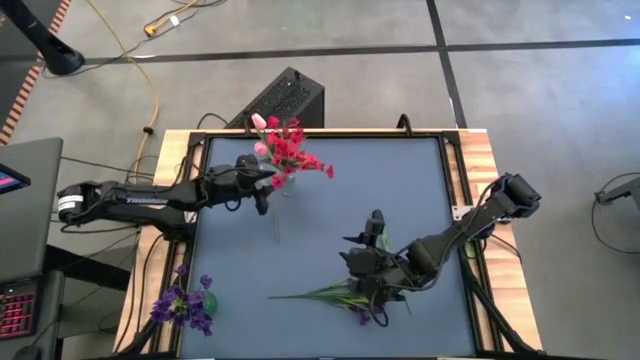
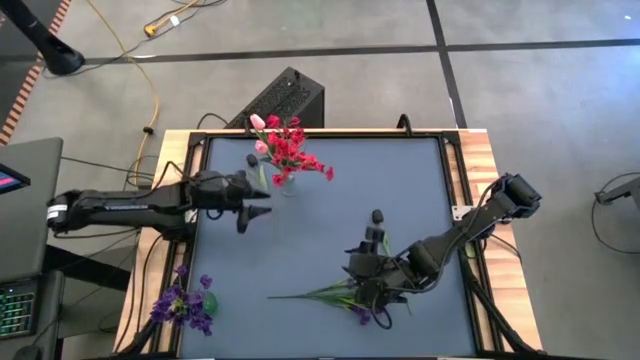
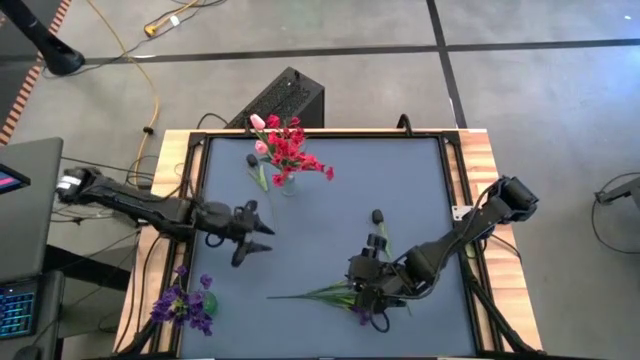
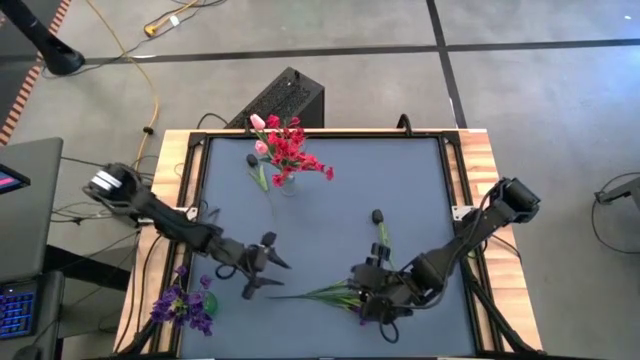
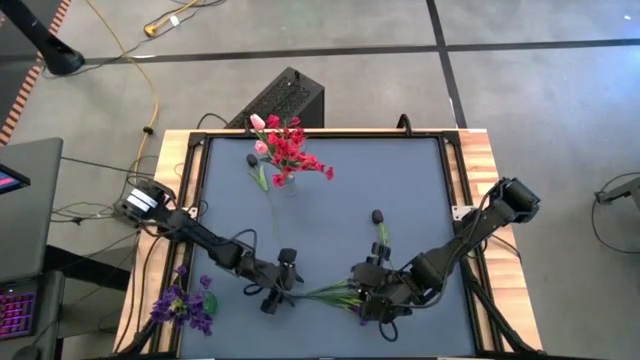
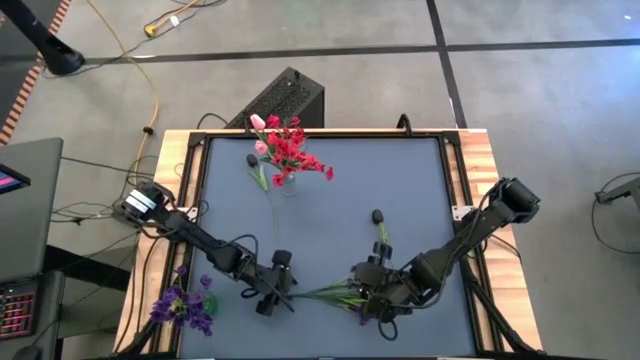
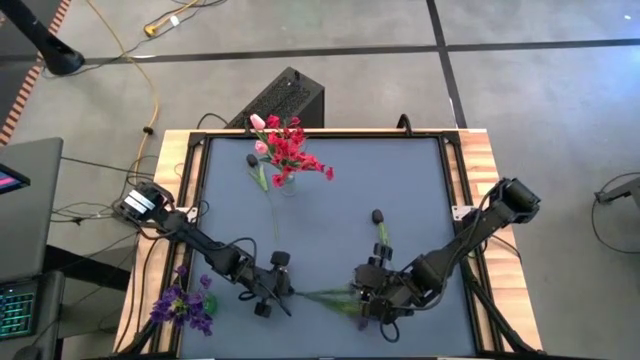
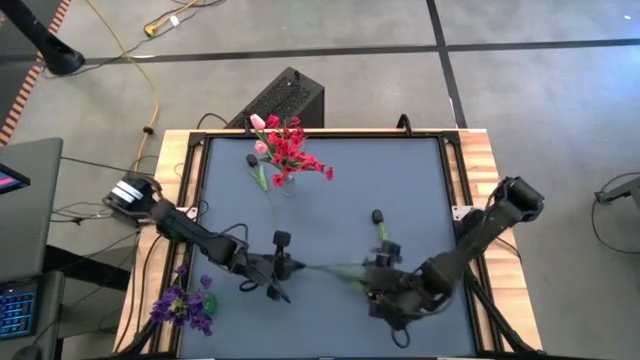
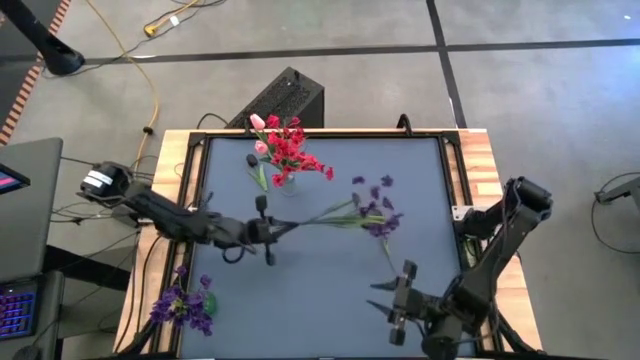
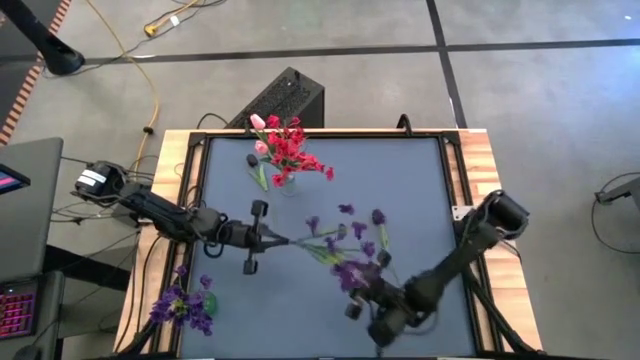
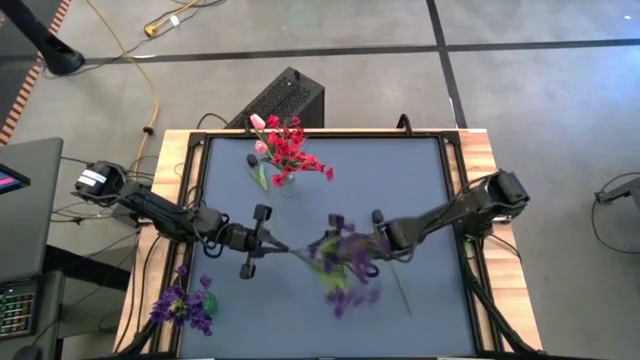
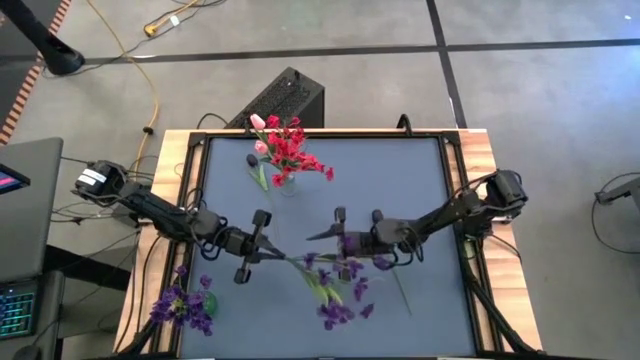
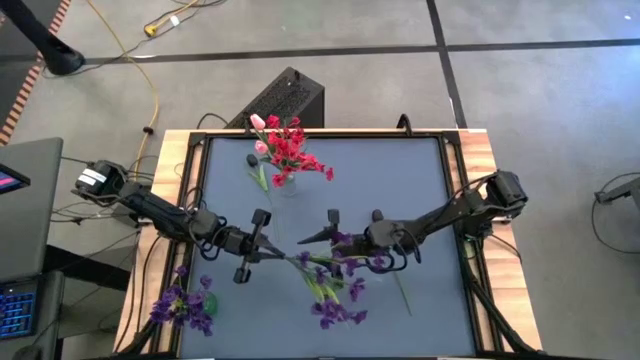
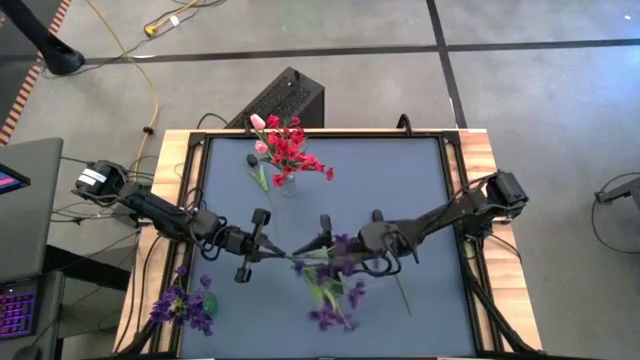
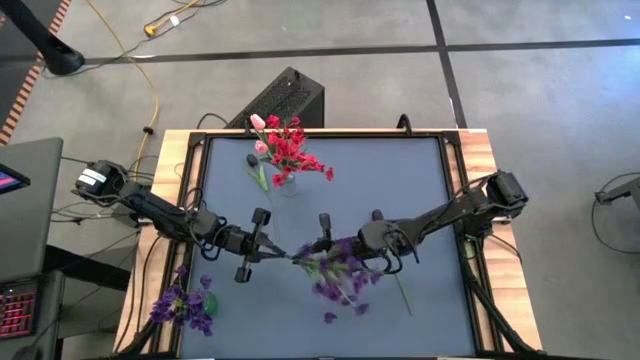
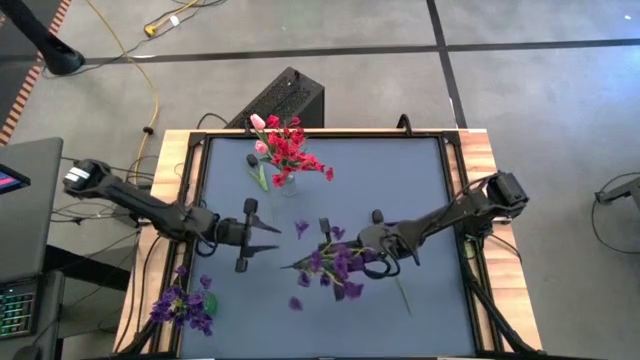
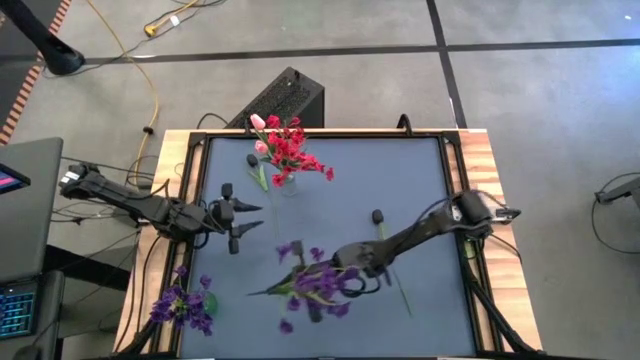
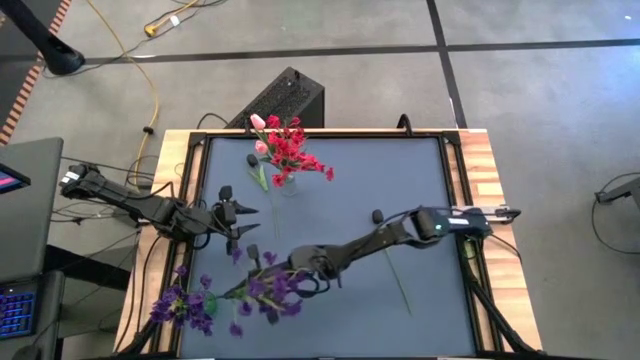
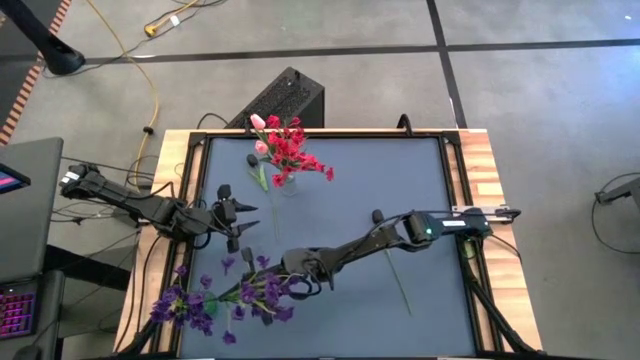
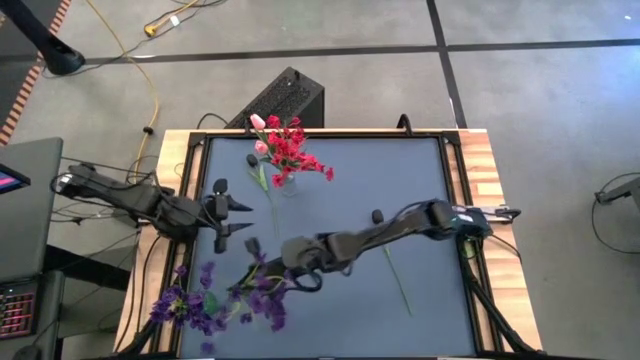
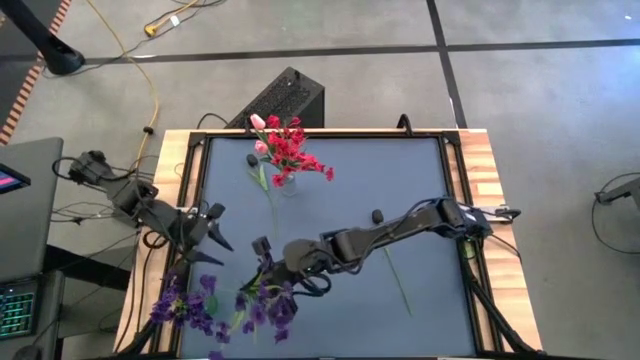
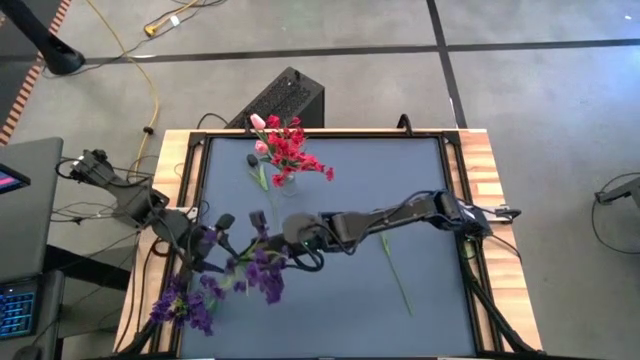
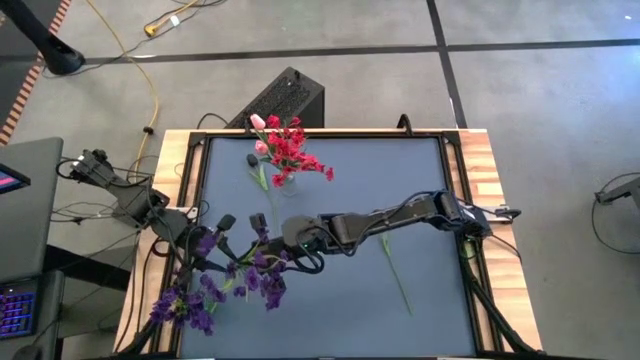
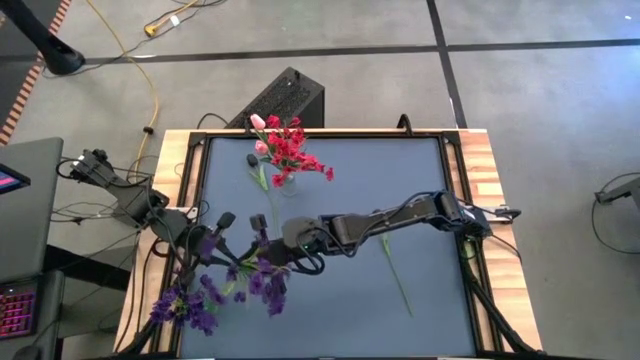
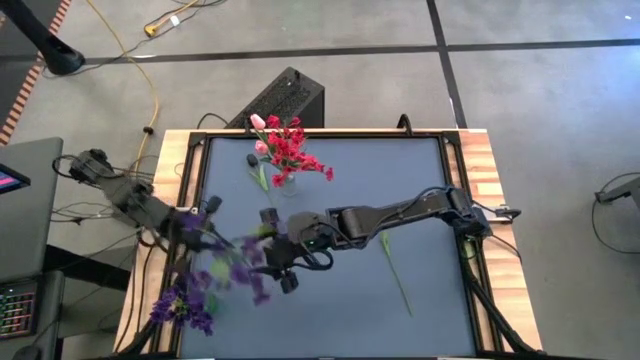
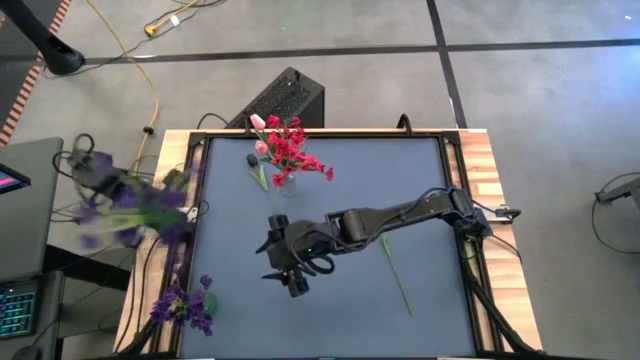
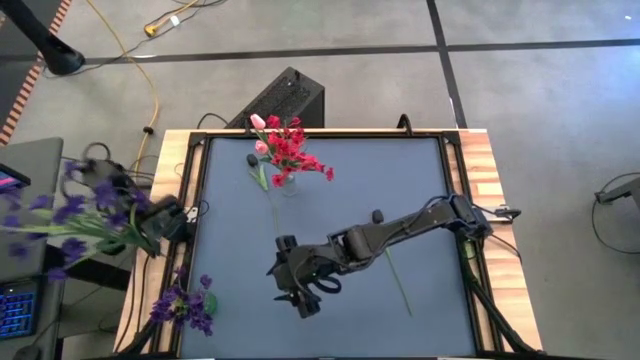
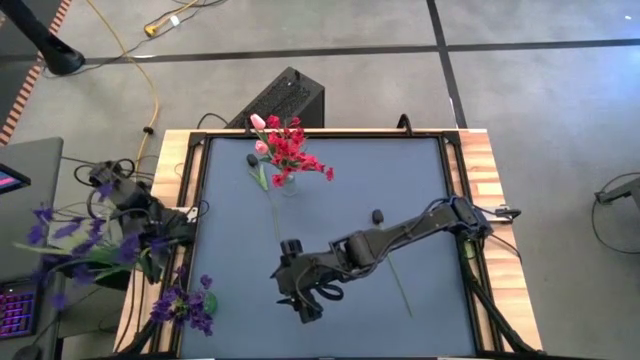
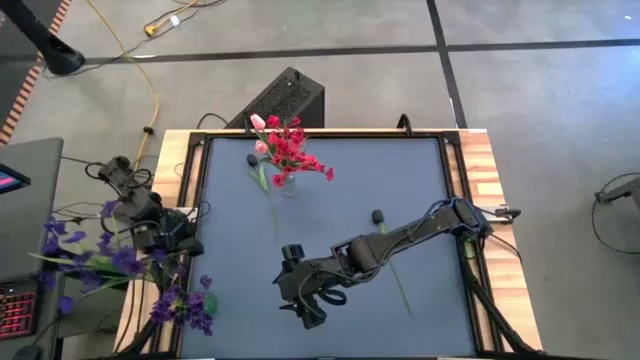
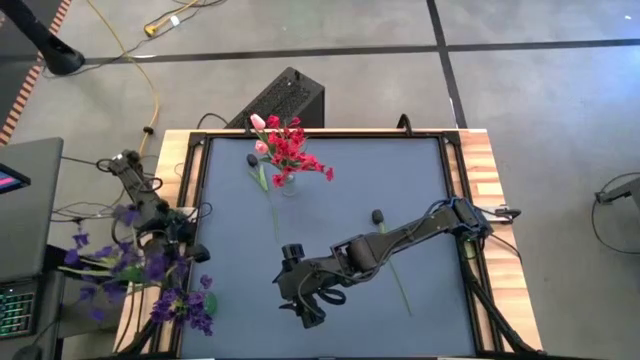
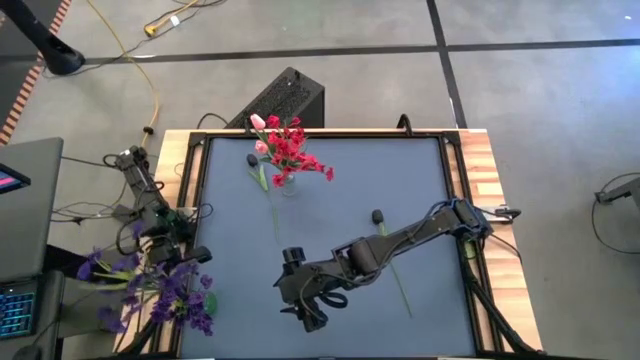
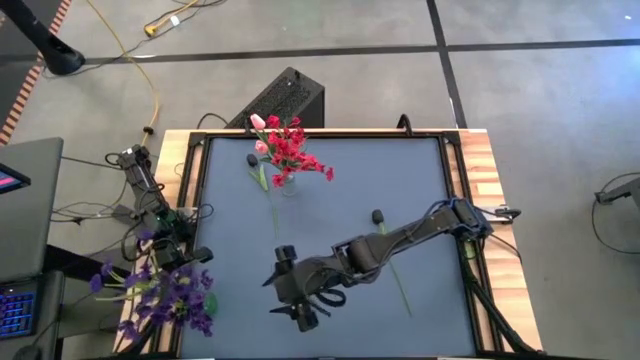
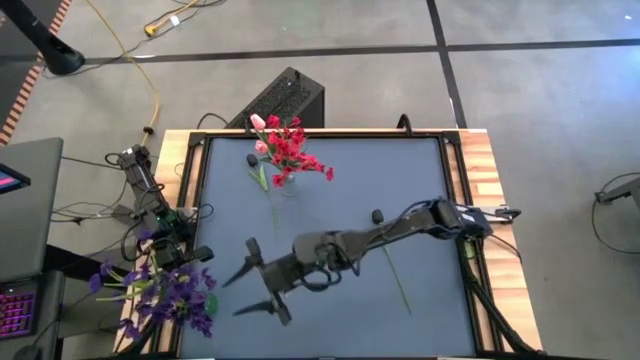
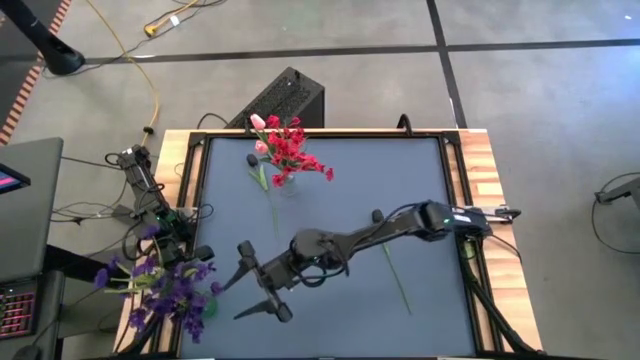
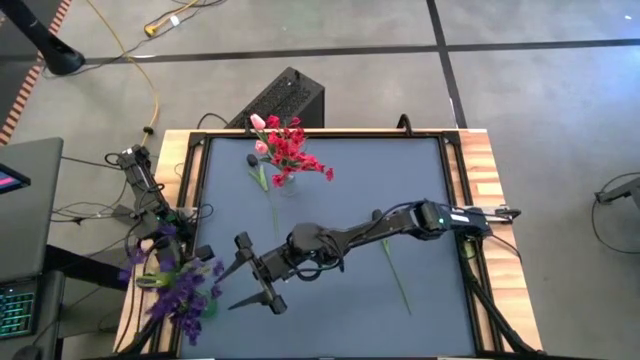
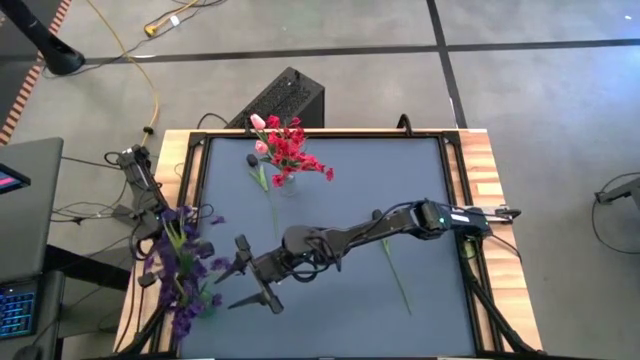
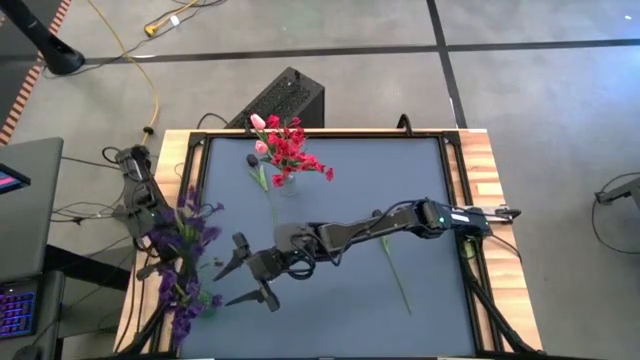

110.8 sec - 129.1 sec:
Task: Sort flowers into vase by color
Put the violet flowers into the green vase

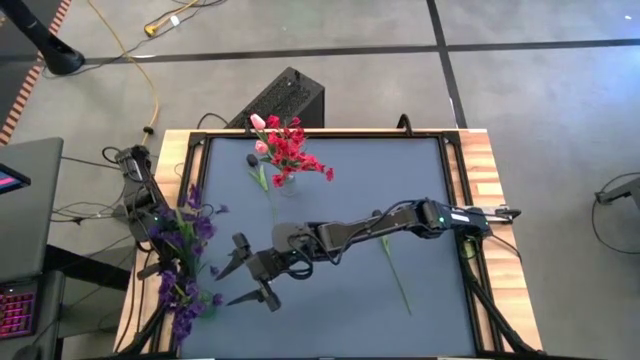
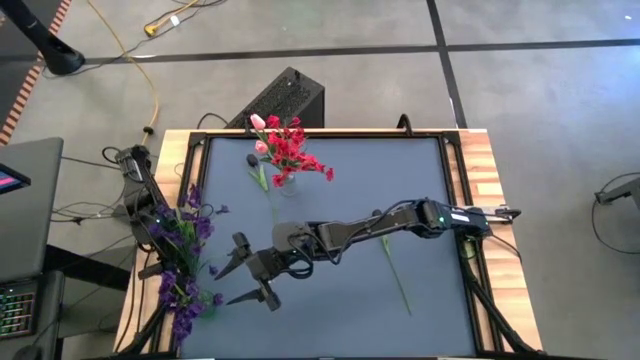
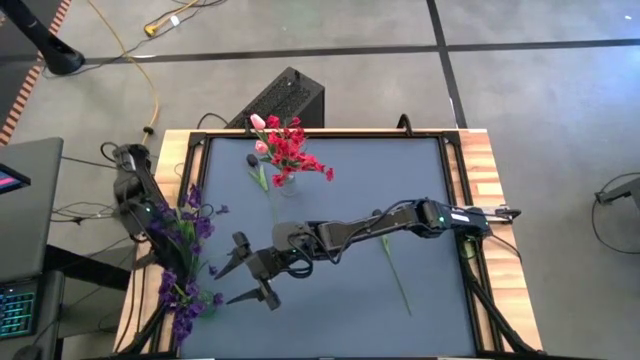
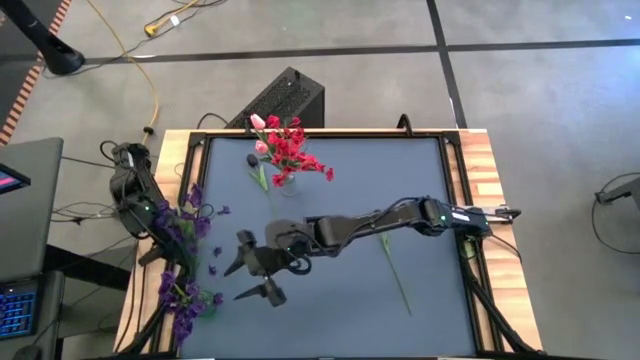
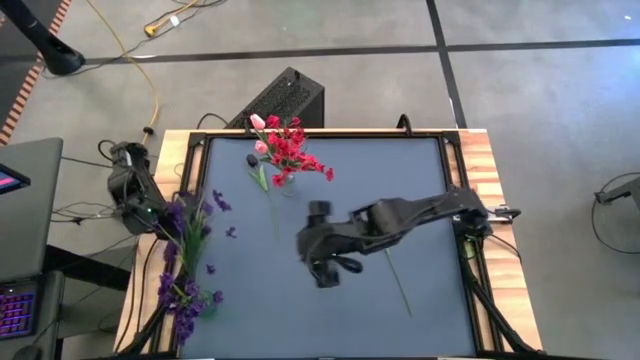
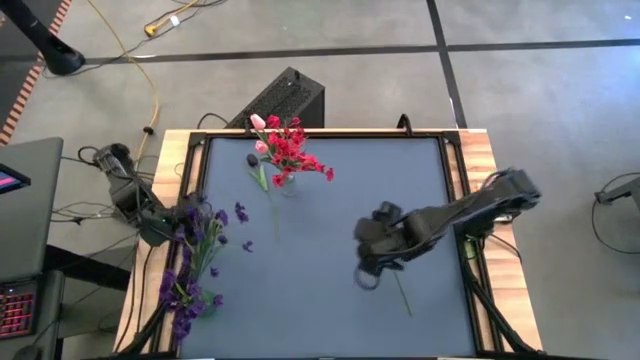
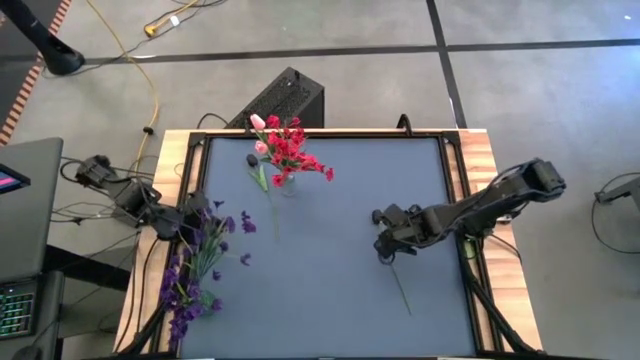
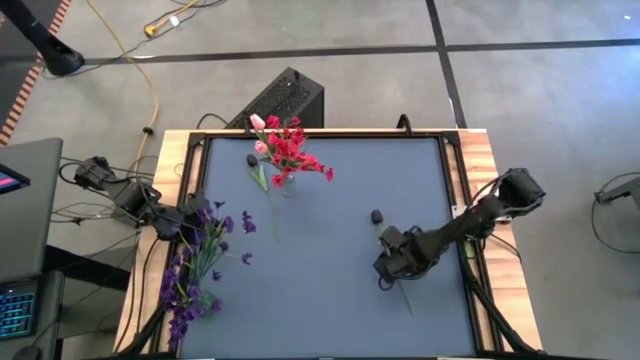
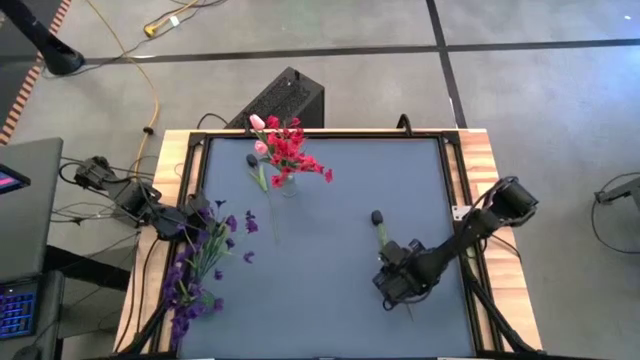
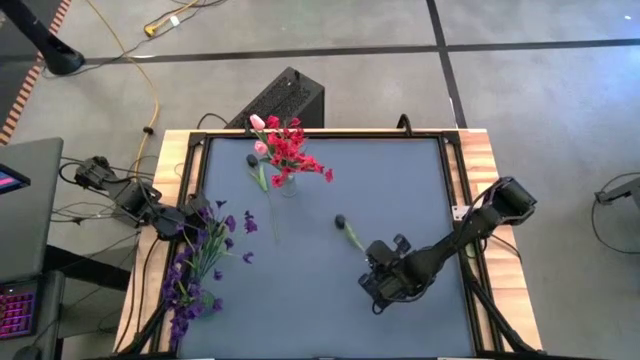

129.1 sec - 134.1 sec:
Put the bottom black tulip into the green vase
